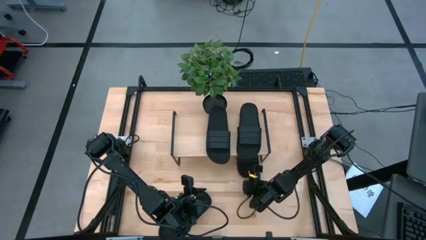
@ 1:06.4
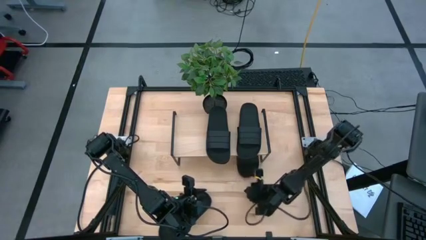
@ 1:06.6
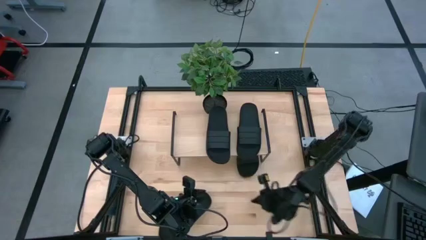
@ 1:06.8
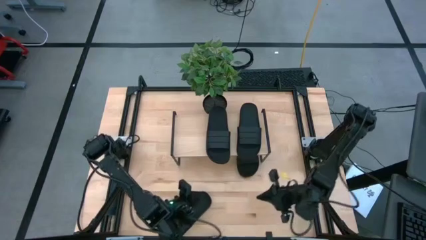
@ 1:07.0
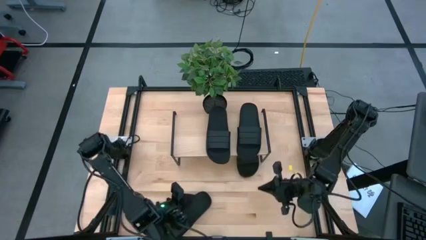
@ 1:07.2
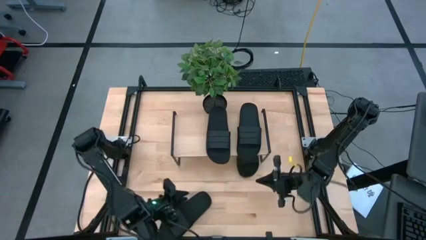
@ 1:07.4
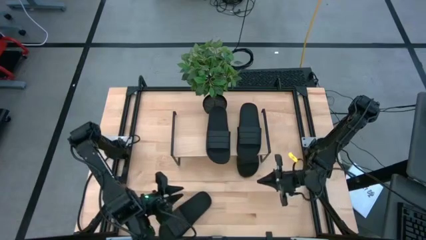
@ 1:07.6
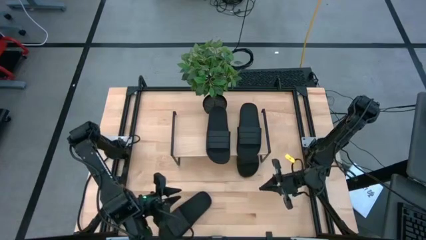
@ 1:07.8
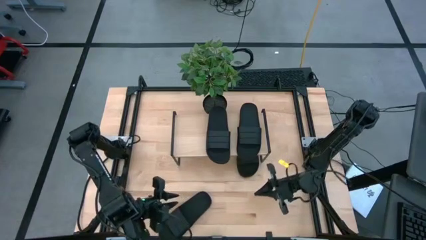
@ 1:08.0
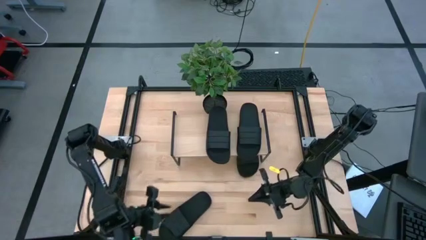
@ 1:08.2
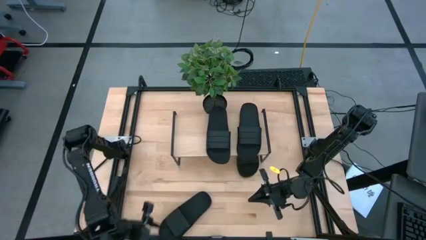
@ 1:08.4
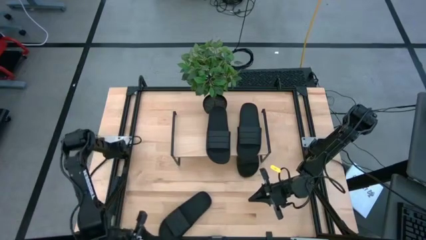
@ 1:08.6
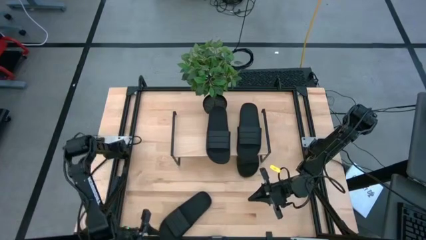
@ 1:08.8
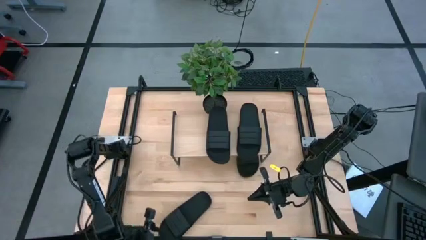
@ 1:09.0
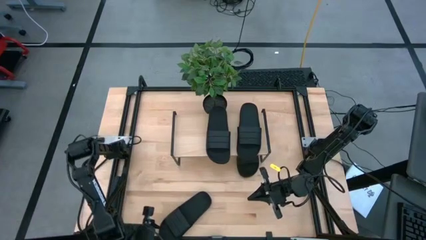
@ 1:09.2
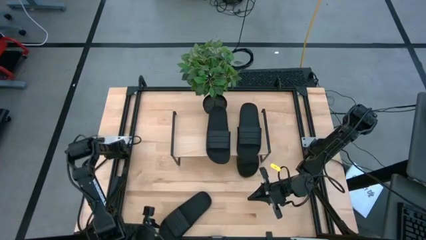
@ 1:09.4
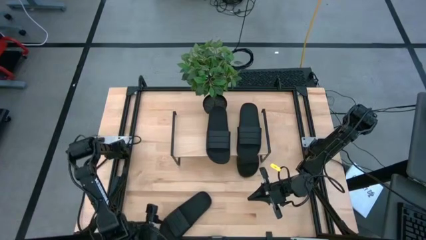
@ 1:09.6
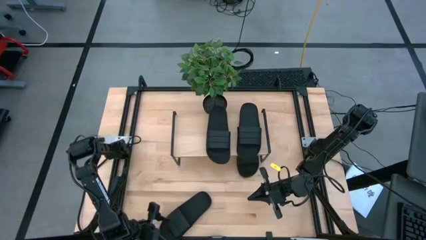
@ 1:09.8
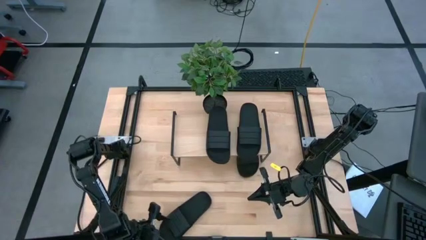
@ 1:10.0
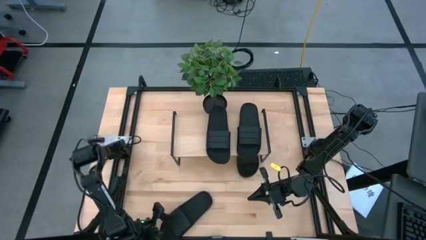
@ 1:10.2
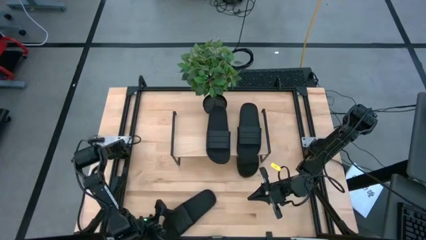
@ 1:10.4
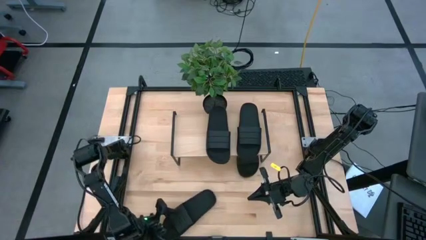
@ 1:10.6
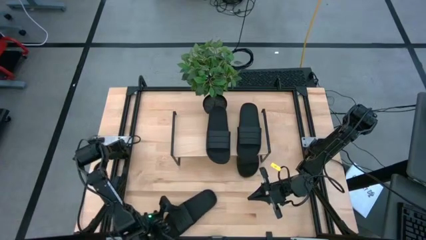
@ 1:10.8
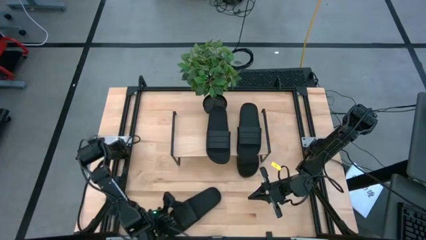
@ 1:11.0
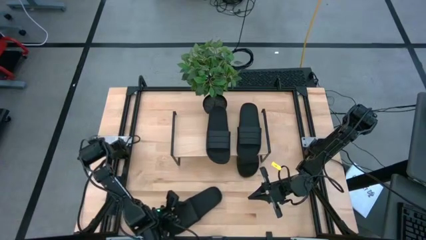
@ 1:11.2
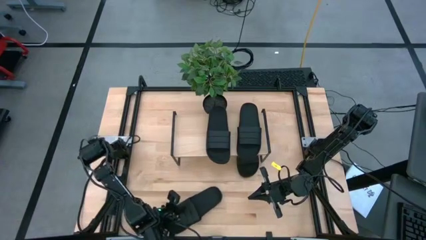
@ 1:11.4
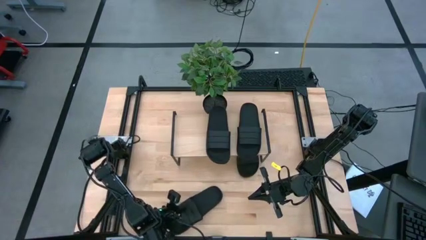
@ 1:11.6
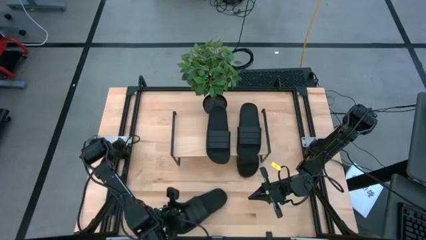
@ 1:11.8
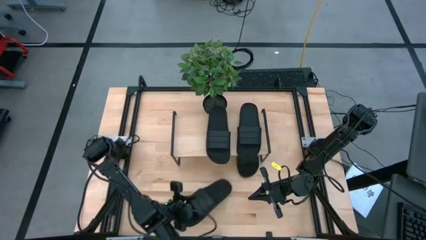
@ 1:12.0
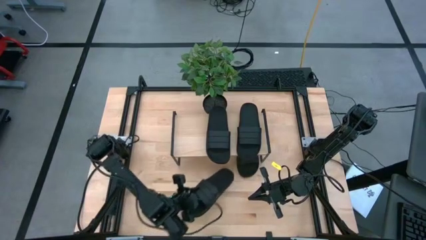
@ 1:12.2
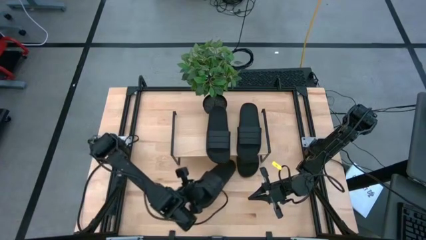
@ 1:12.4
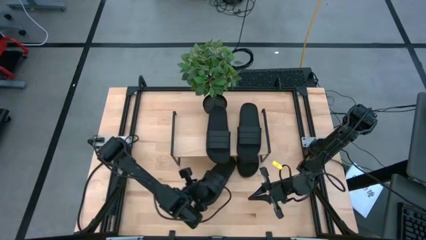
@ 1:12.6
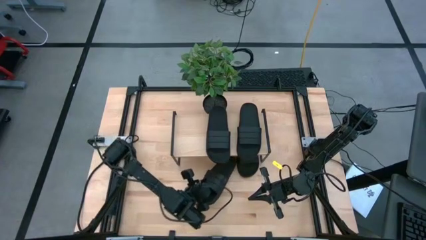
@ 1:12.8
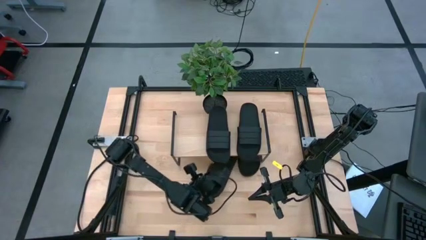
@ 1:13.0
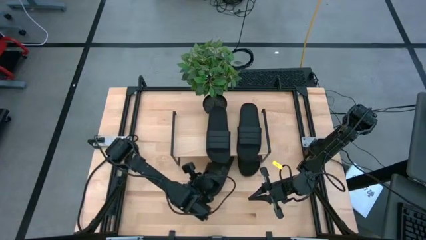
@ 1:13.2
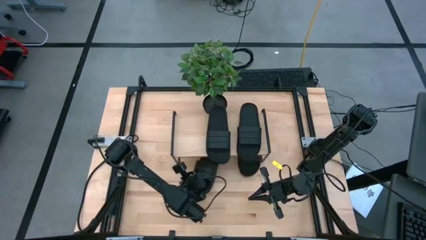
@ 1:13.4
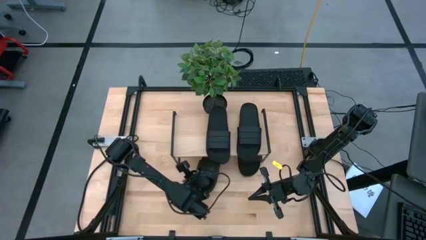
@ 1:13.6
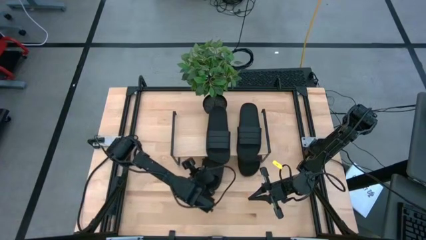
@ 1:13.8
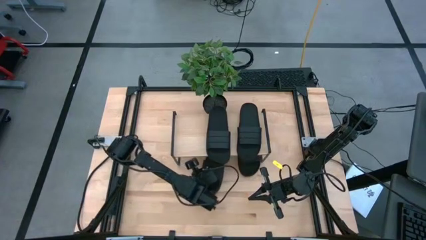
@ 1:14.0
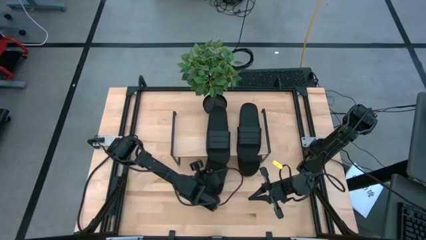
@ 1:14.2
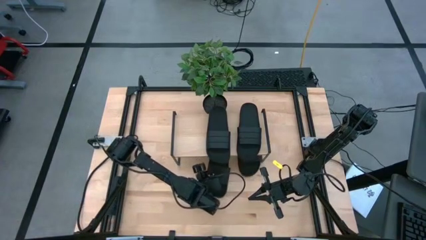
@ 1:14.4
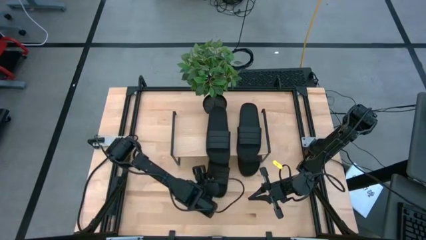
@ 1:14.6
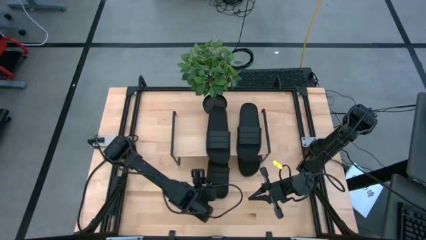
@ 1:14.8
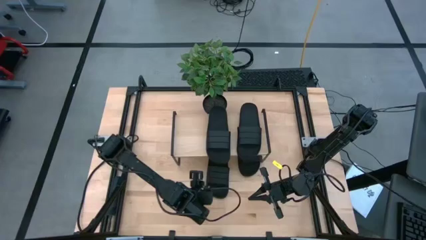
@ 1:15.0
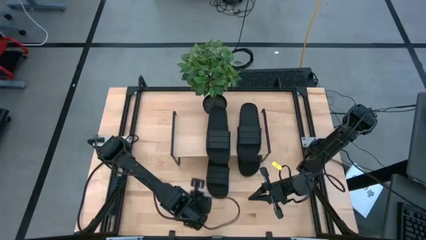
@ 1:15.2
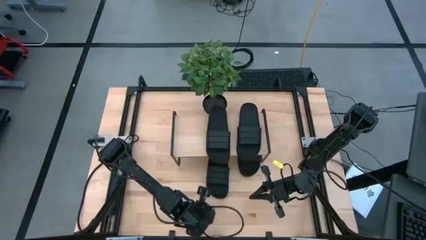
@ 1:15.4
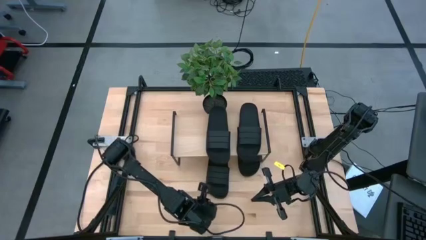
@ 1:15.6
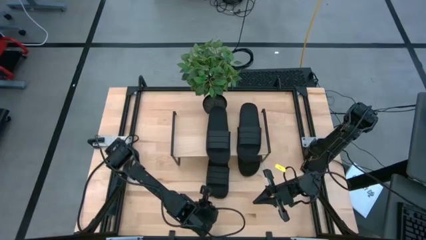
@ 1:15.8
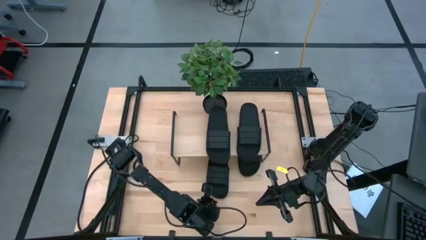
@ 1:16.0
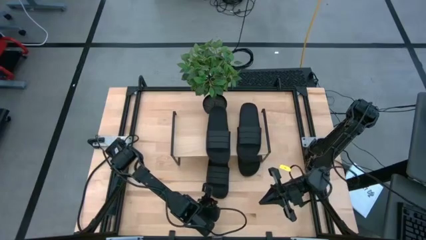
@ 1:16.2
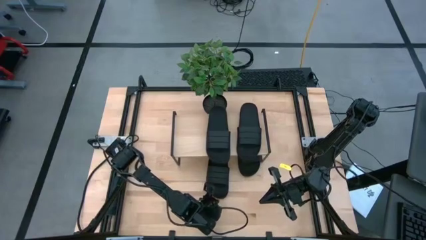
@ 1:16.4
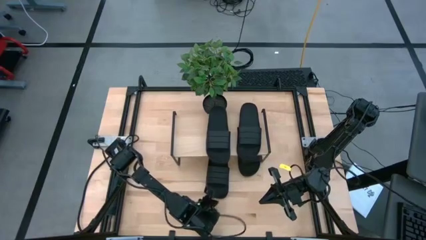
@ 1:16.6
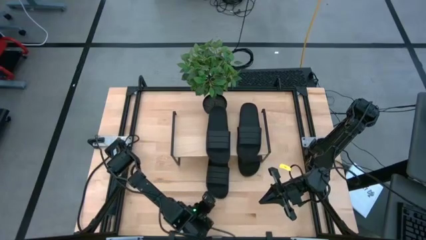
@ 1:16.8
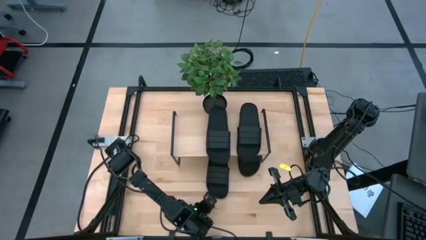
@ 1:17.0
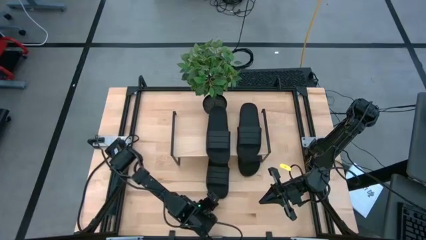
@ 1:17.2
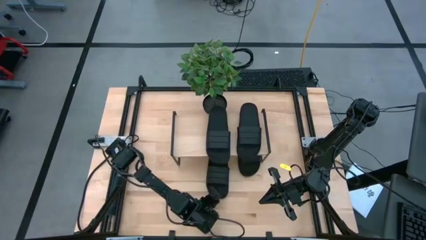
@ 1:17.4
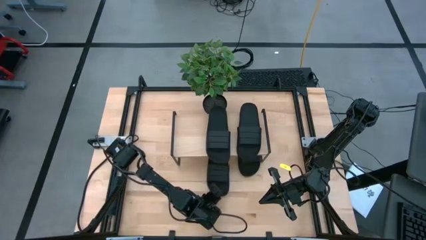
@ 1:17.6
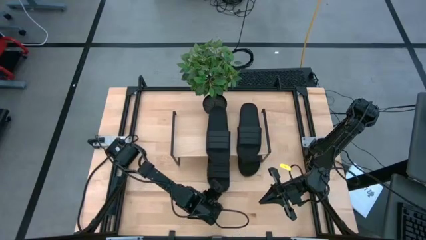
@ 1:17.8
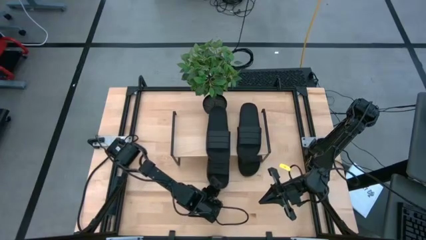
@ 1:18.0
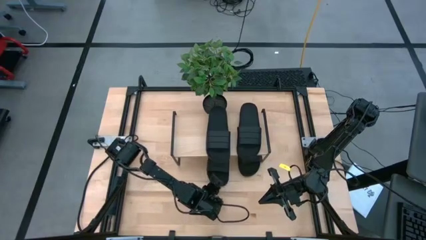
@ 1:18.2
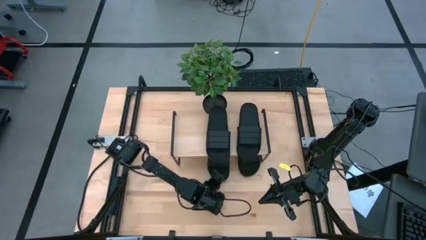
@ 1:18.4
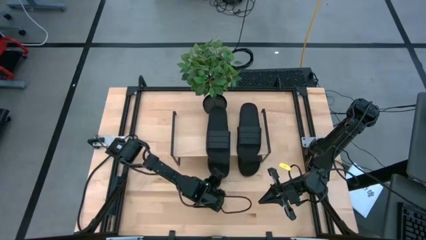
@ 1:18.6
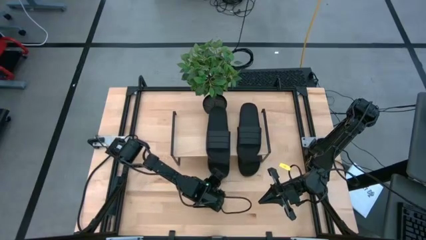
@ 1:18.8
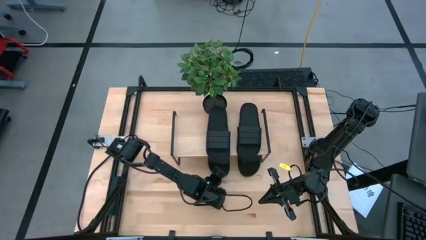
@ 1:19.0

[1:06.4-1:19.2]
Task: Pick and place slides into the shelf
Put the black slide under the shelf
